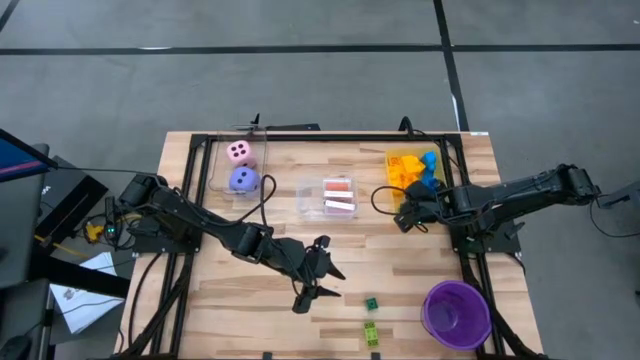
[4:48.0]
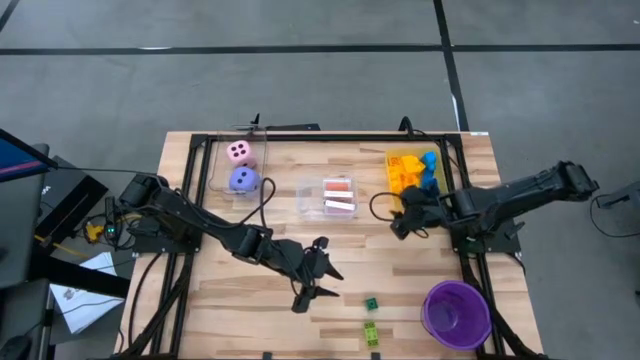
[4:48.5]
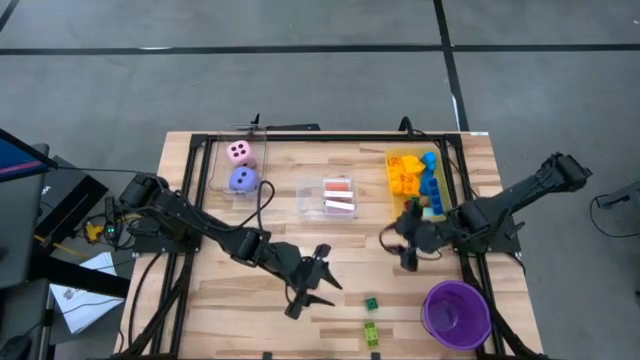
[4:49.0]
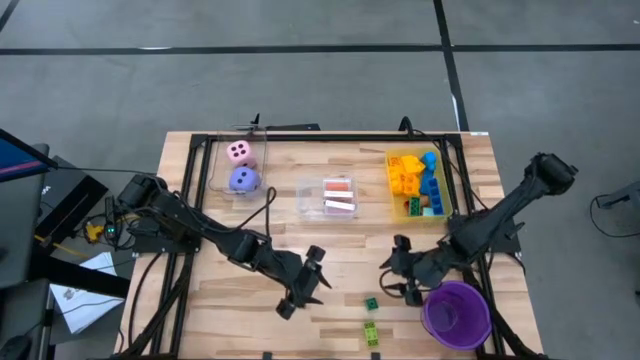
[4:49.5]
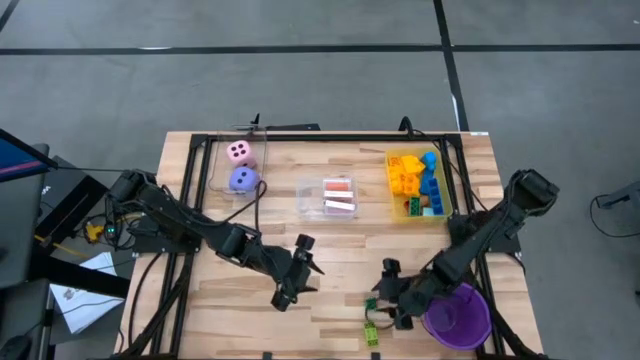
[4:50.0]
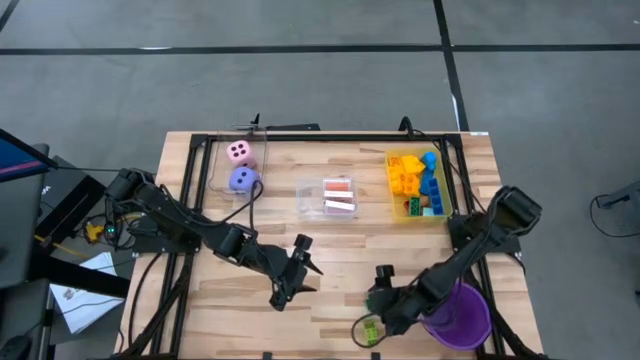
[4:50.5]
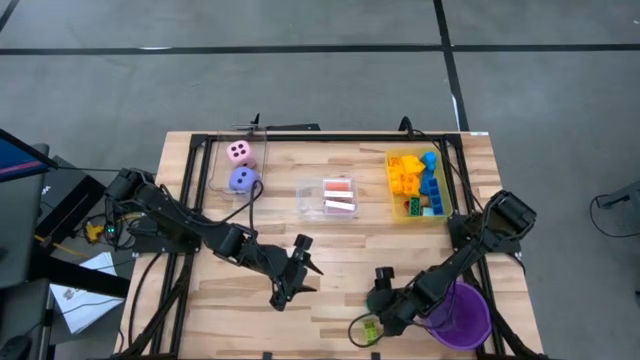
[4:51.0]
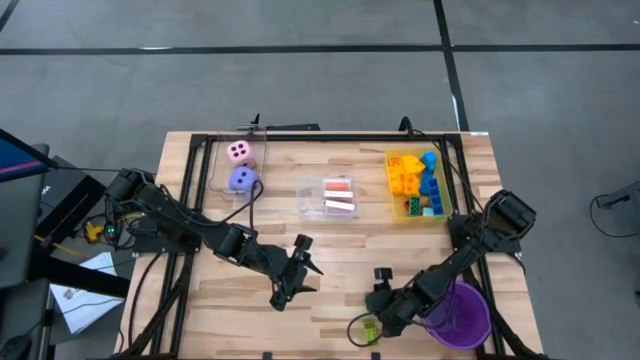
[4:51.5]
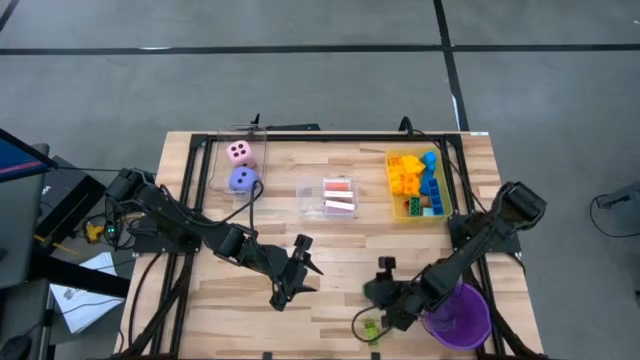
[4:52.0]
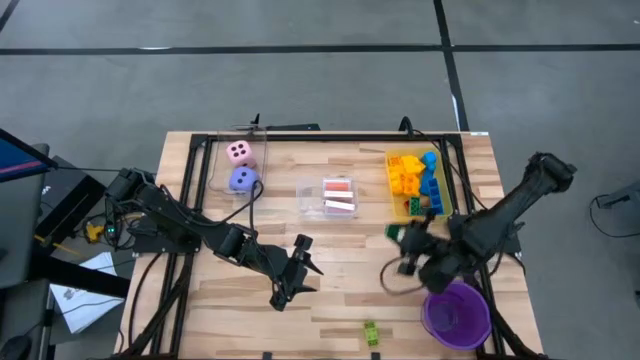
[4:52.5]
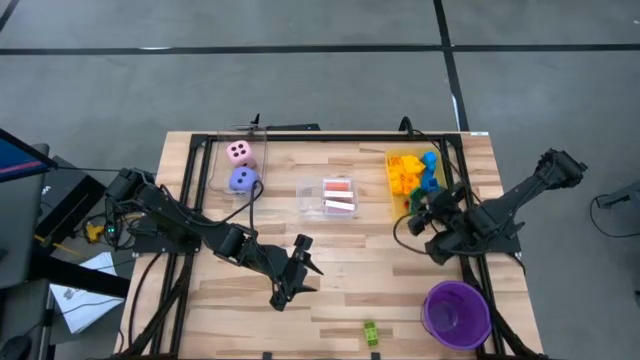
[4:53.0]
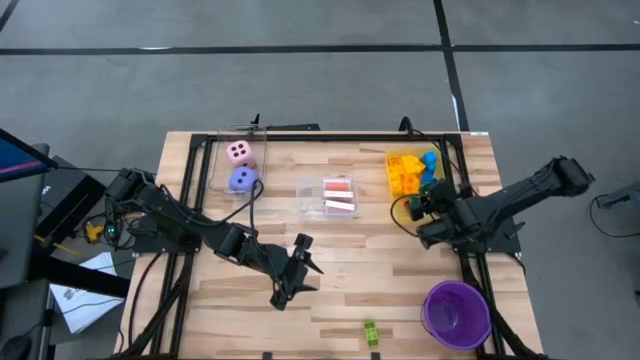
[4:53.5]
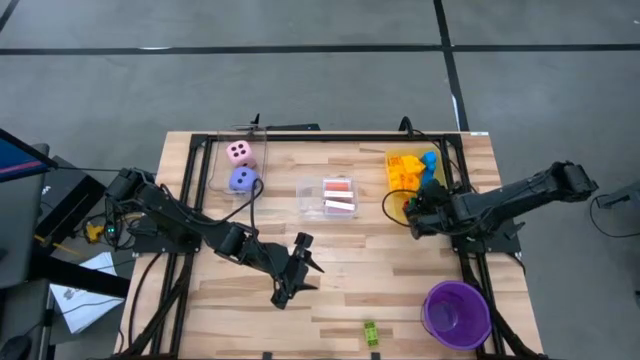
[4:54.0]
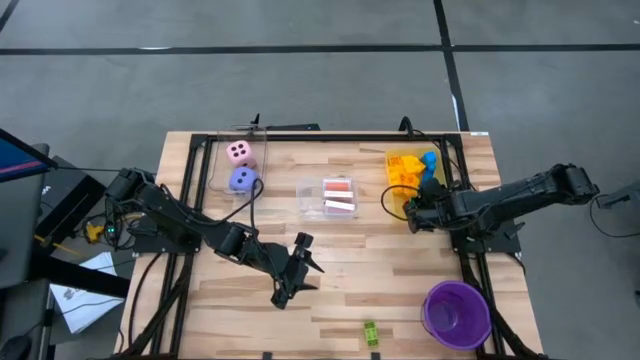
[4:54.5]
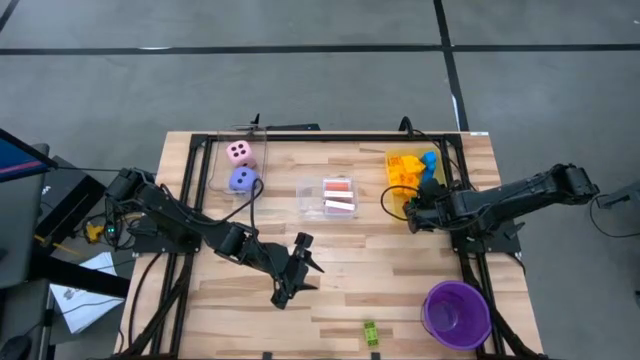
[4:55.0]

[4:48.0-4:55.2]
Task: Pick & Place Toys
Put the green game piece into the yellow bin

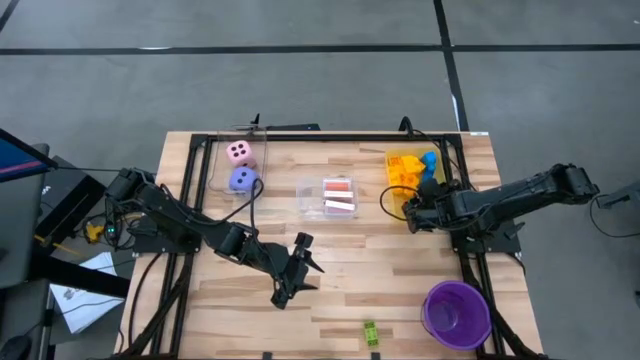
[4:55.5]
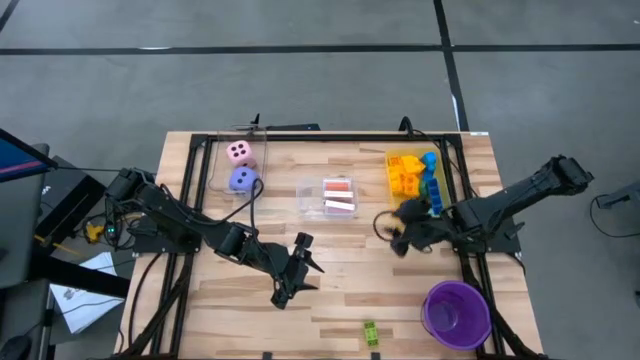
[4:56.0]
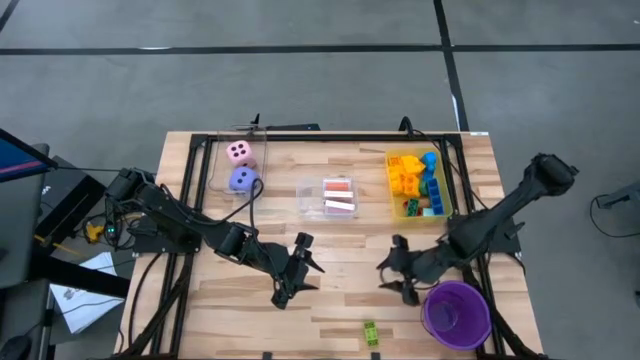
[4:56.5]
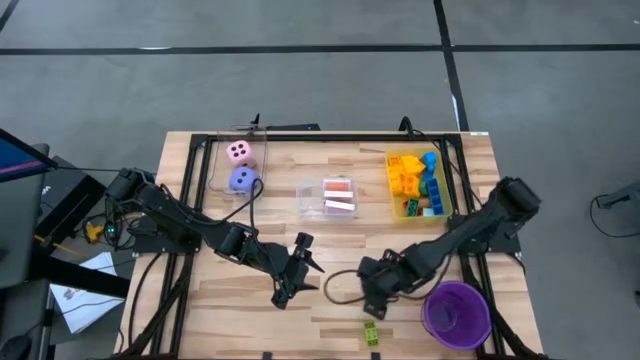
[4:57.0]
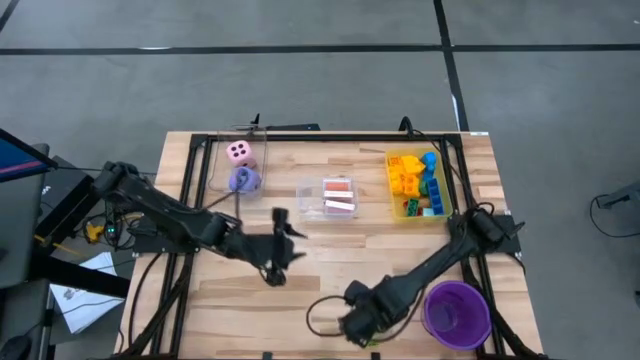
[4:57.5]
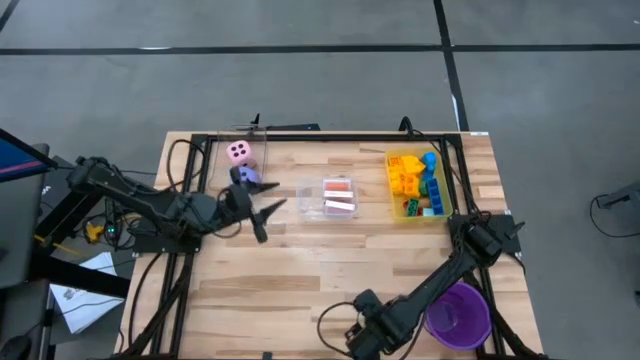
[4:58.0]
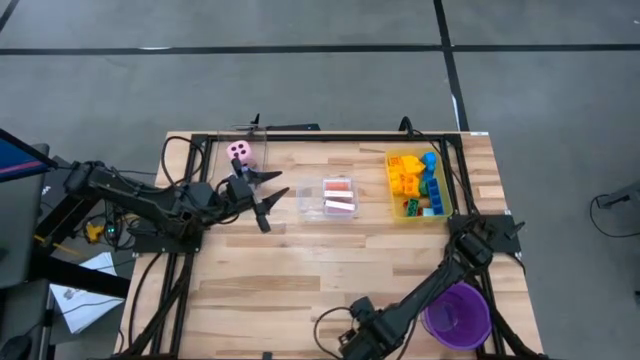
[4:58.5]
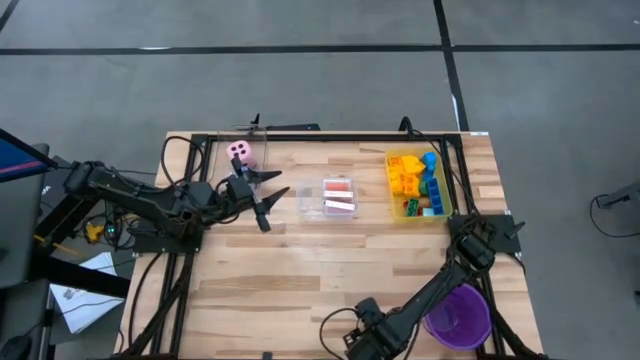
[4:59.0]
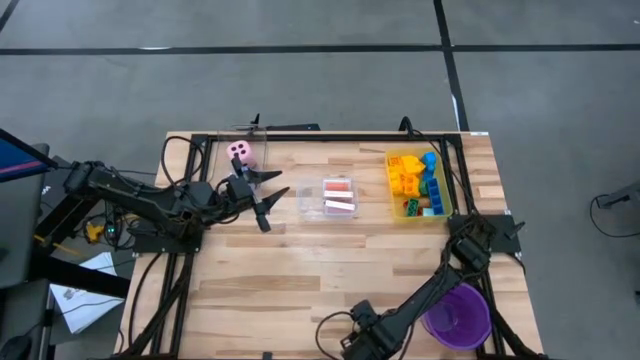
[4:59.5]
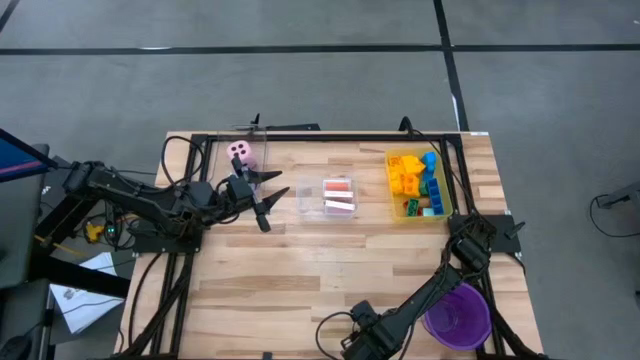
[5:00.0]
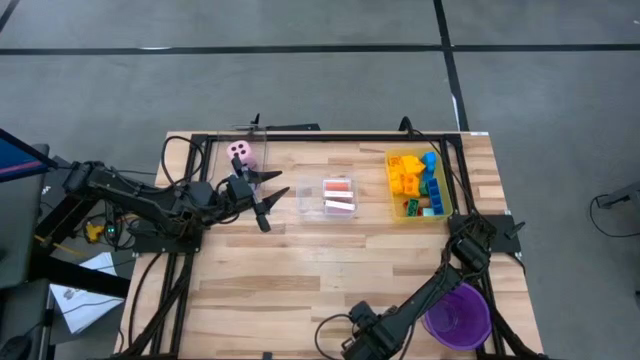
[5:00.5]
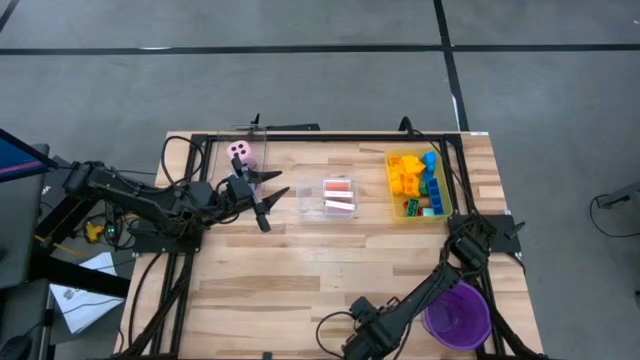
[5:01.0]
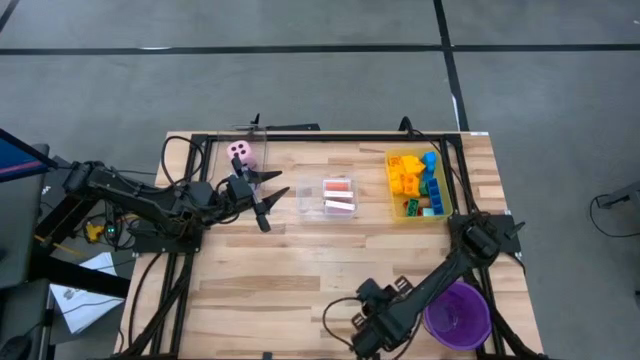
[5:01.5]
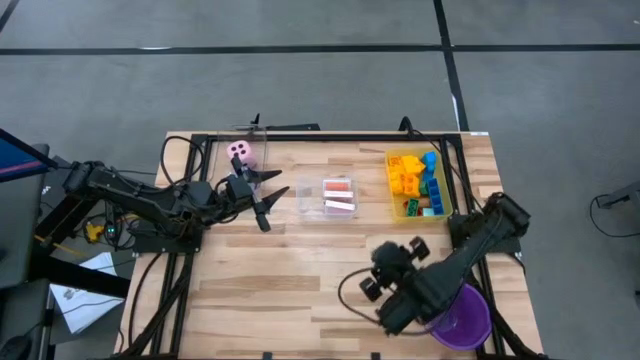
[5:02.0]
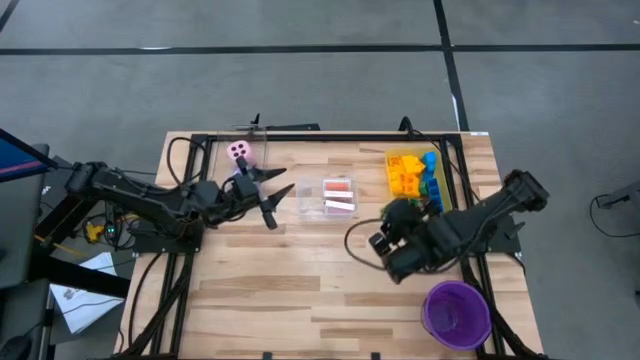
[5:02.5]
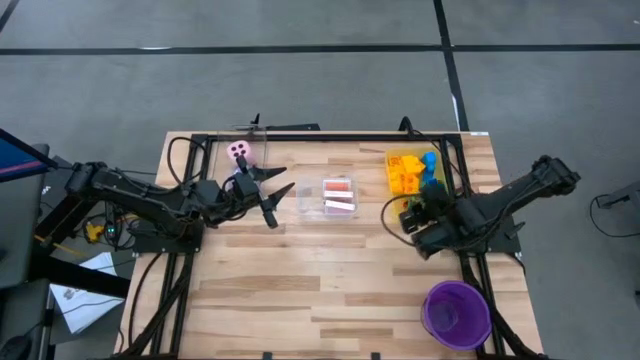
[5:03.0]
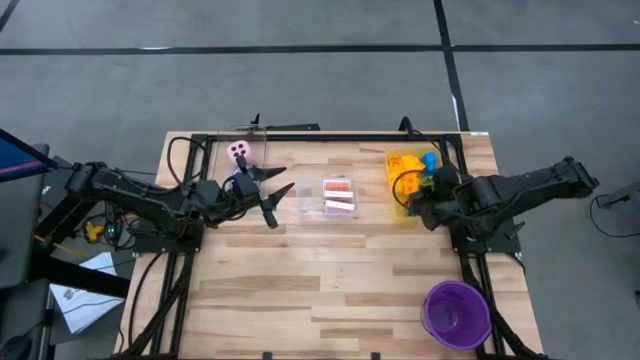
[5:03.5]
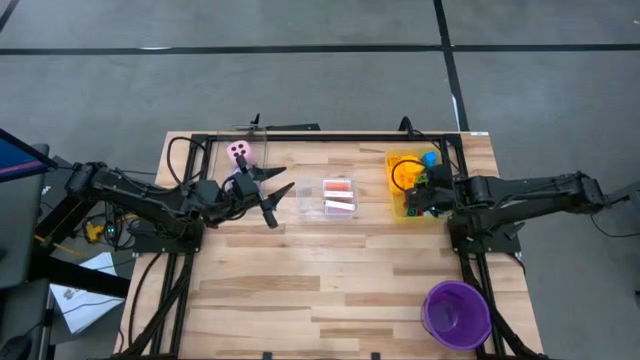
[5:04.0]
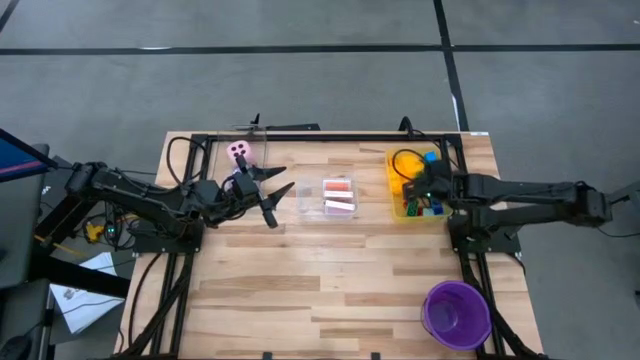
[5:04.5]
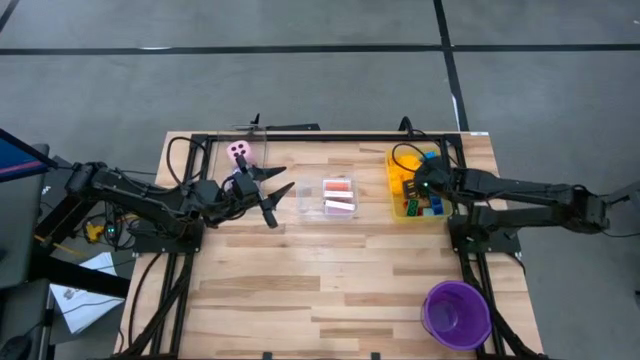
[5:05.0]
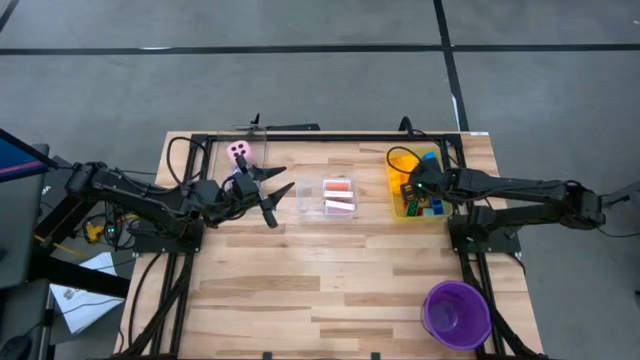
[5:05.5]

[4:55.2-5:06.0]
Put the light green game piece into the yellow bin

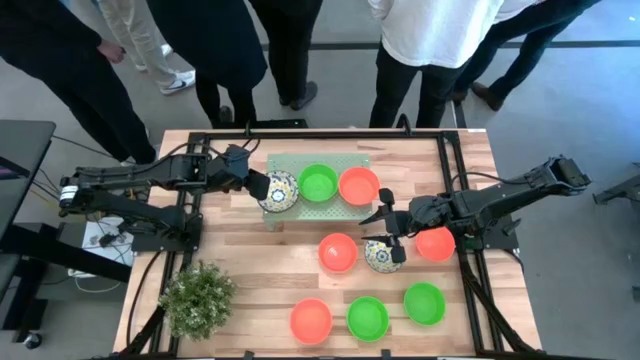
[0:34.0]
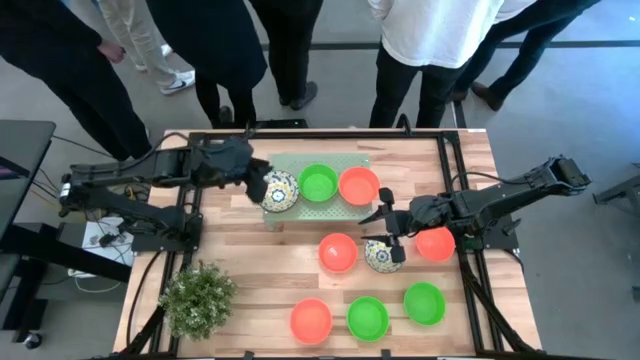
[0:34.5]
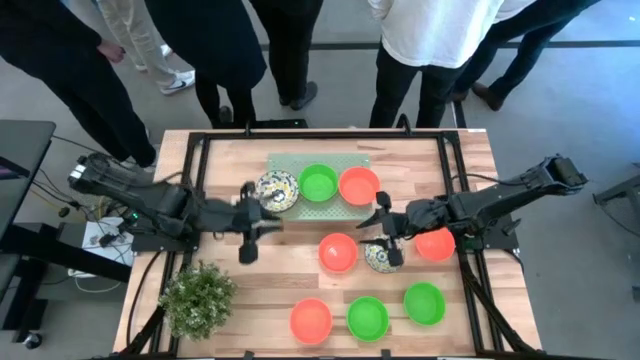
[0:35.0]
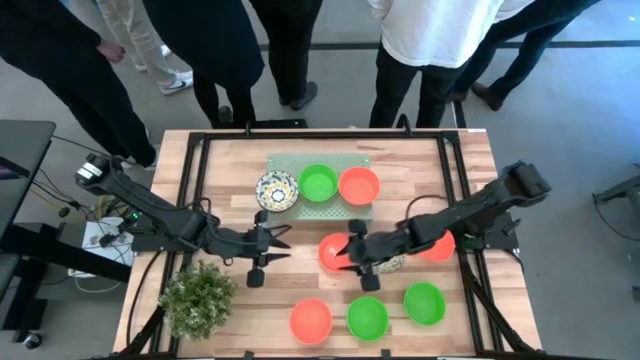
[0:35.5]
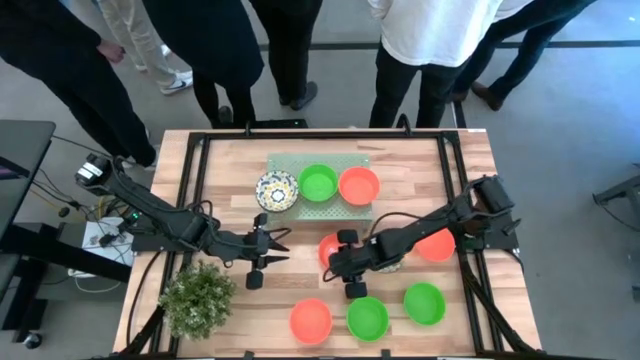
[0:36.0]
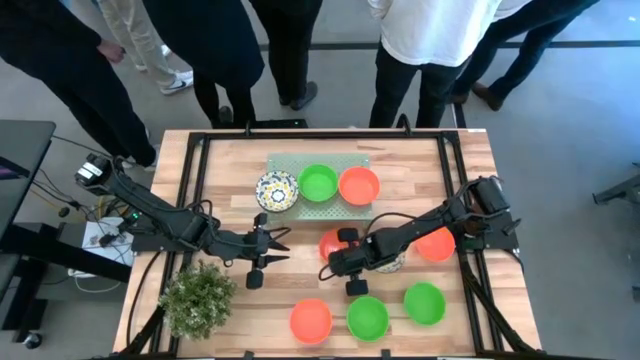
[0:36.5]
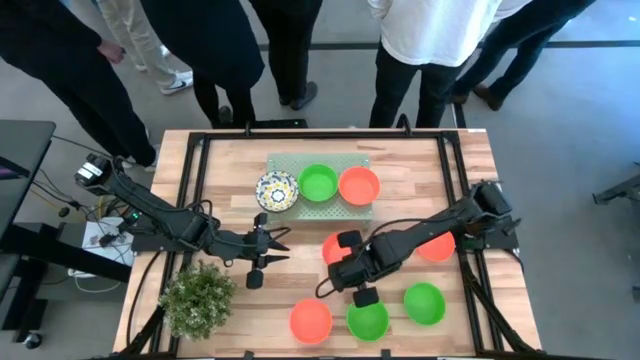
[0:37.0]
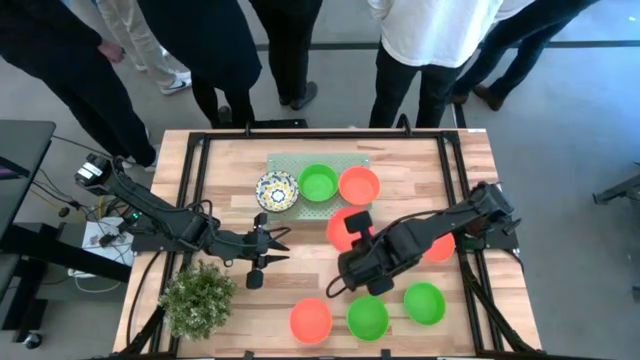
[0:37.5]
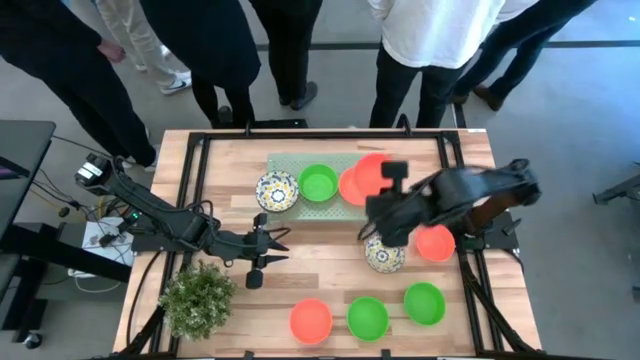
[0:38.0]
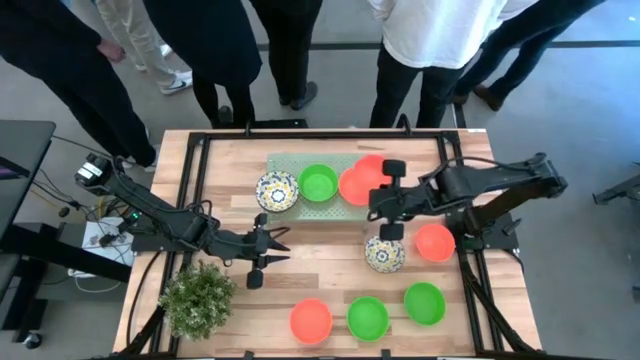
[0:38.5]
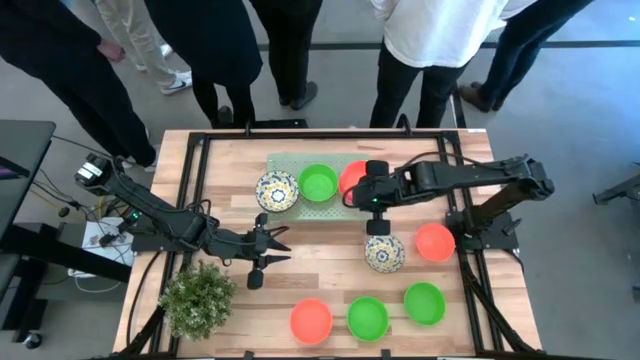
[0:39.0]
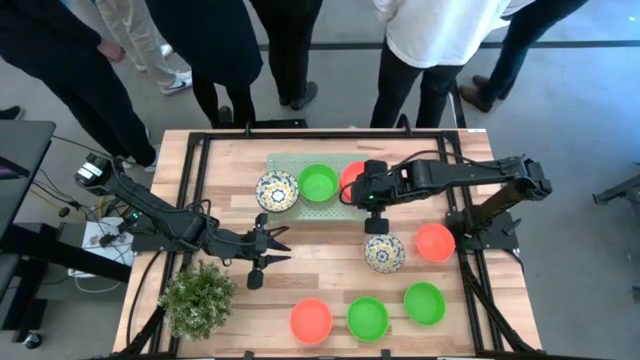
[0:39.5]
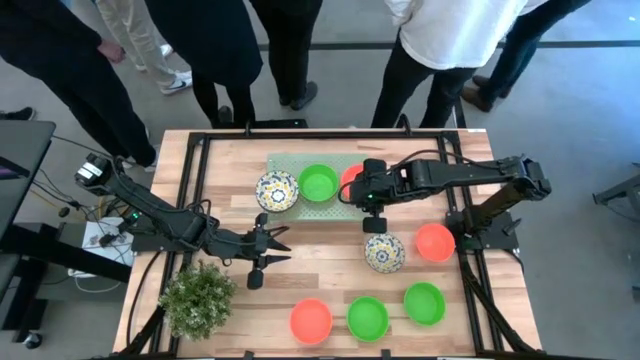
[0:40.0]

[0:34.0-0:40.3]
Task: Pick & Place Mini bowls
Stack the orange bowl on top of the orange bowl on the shelf
